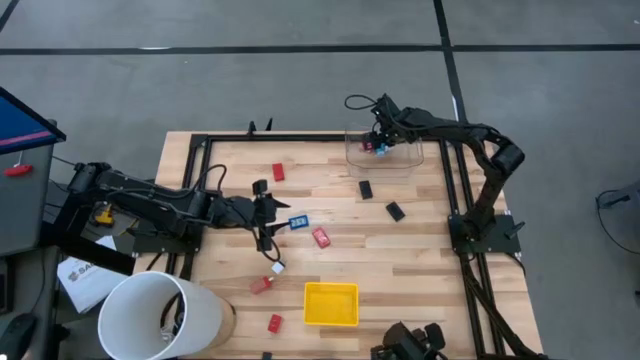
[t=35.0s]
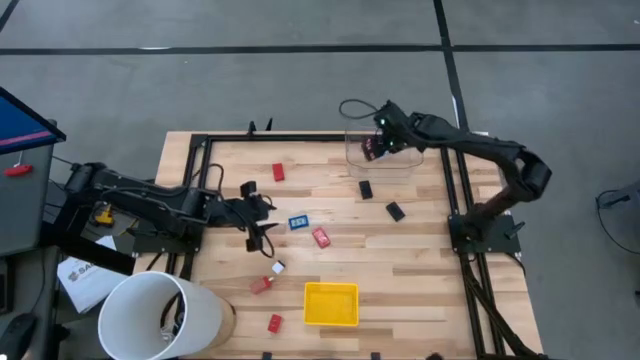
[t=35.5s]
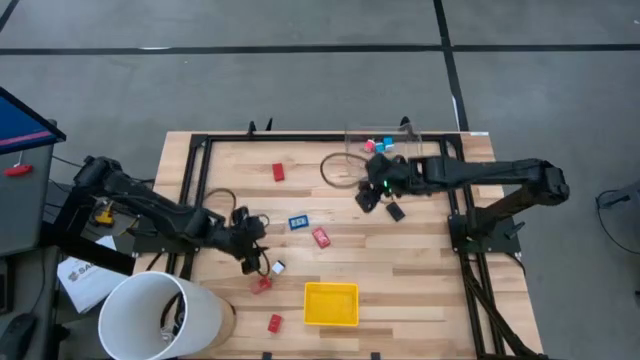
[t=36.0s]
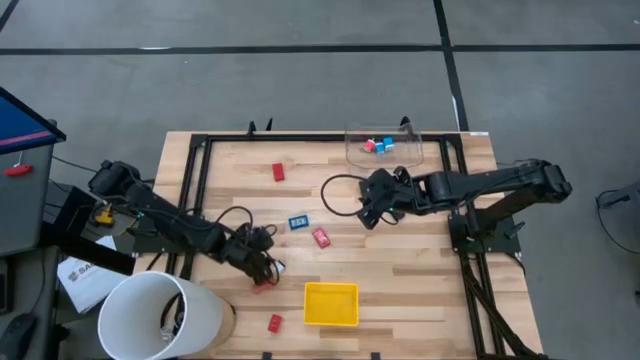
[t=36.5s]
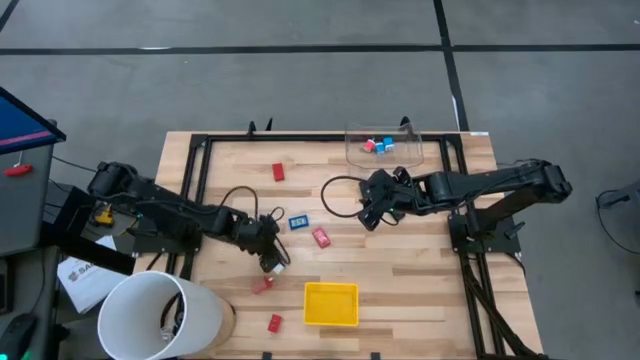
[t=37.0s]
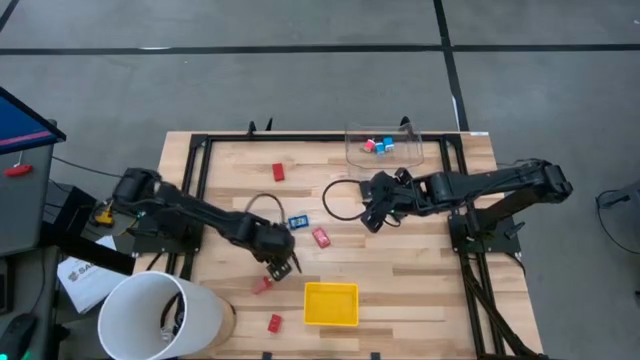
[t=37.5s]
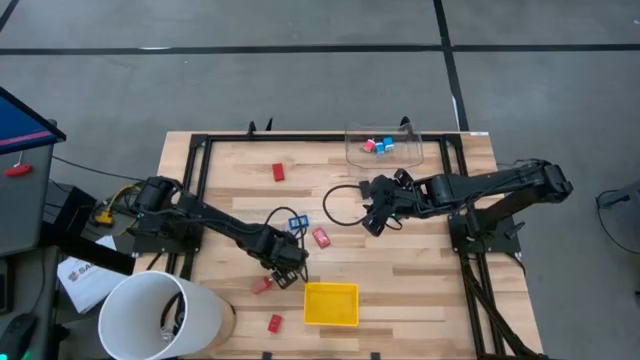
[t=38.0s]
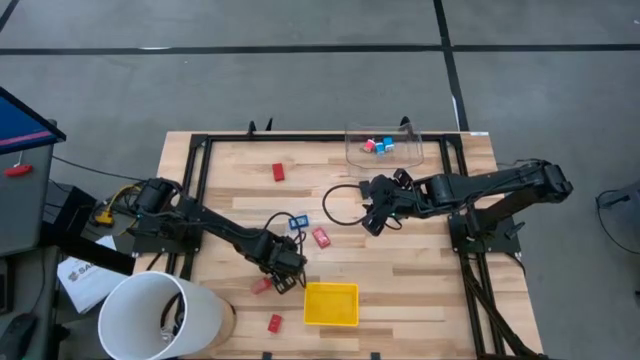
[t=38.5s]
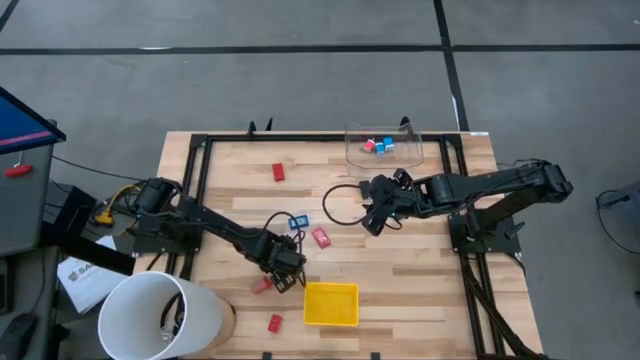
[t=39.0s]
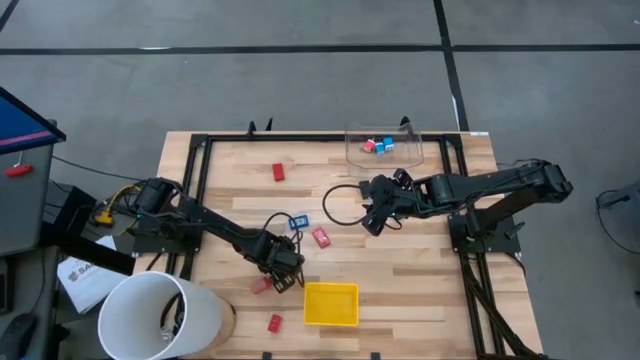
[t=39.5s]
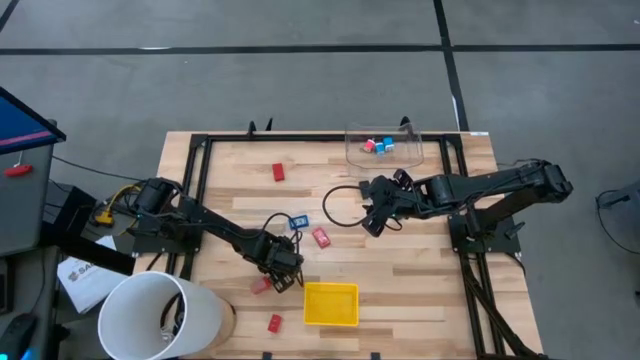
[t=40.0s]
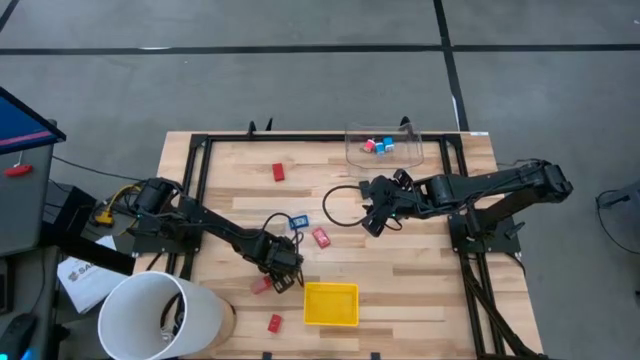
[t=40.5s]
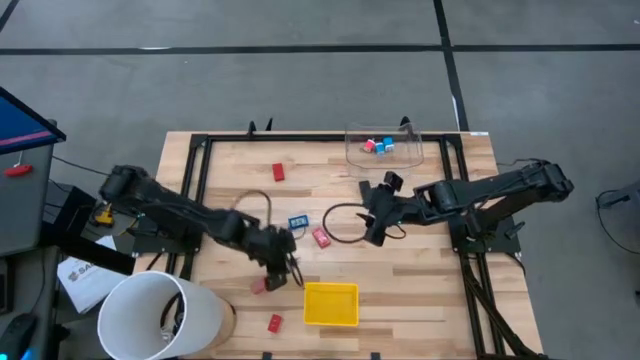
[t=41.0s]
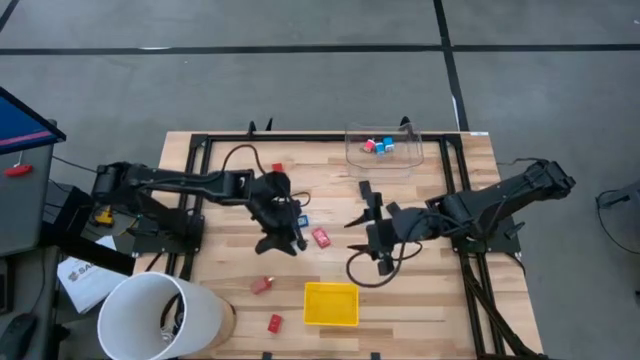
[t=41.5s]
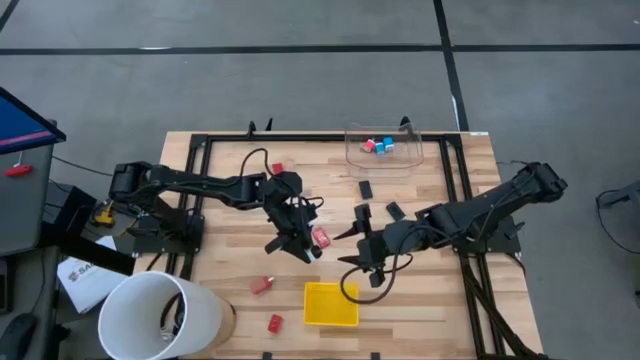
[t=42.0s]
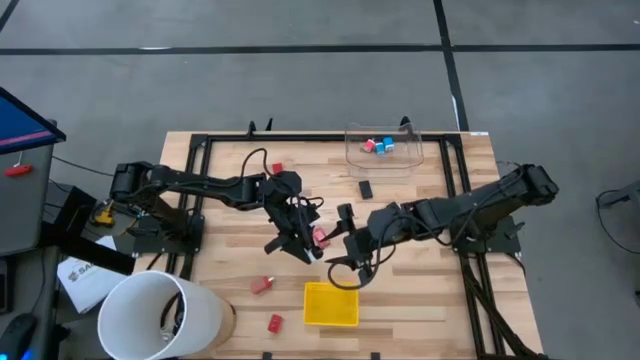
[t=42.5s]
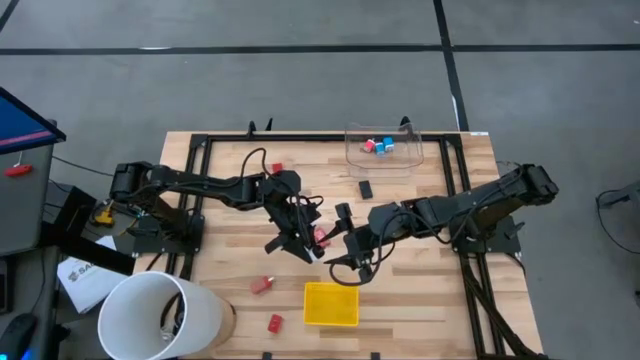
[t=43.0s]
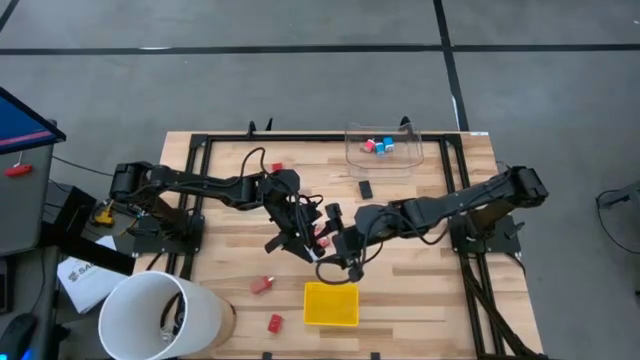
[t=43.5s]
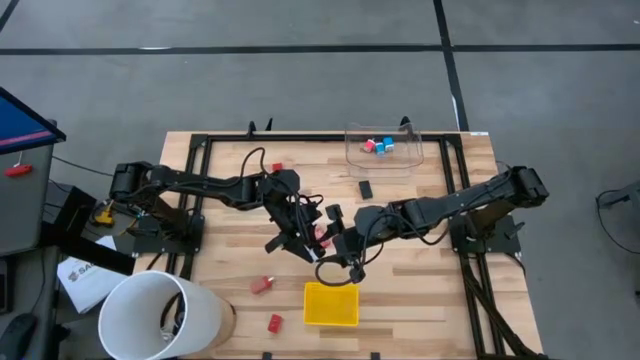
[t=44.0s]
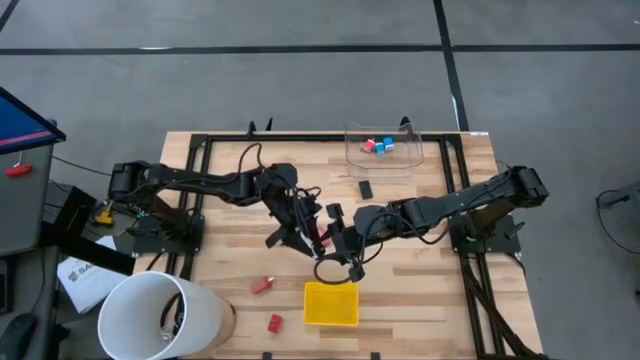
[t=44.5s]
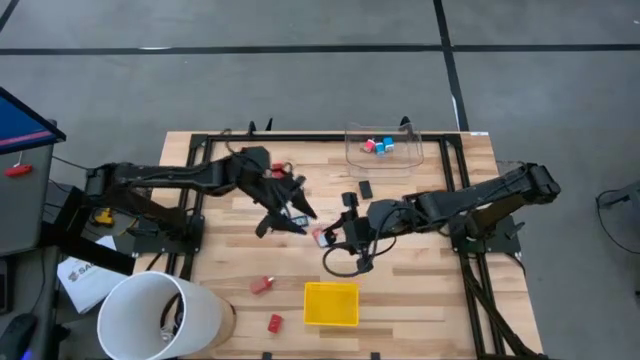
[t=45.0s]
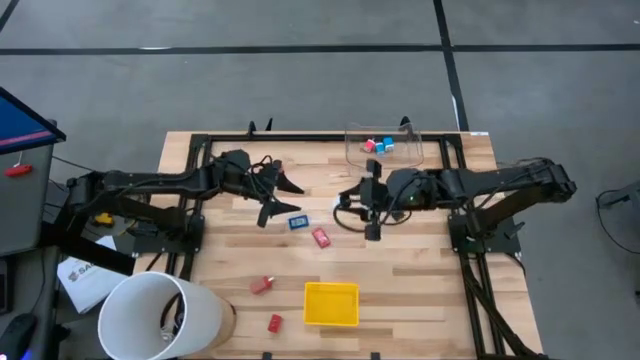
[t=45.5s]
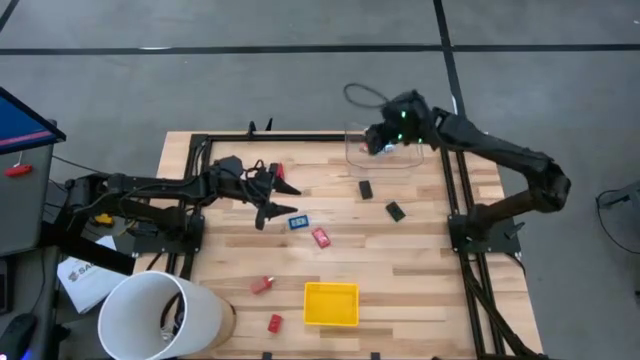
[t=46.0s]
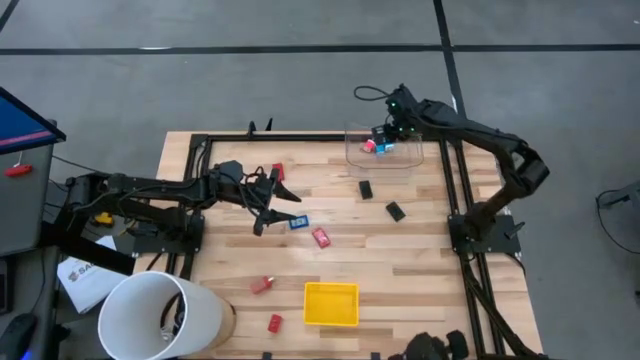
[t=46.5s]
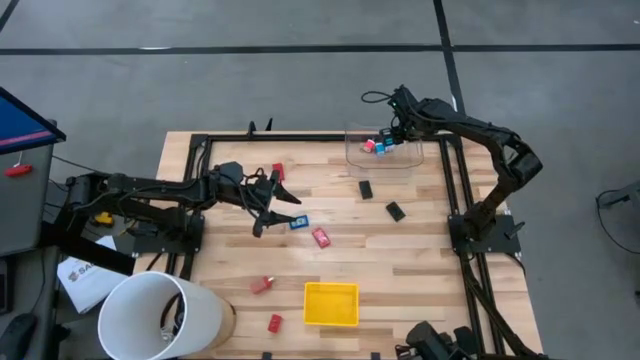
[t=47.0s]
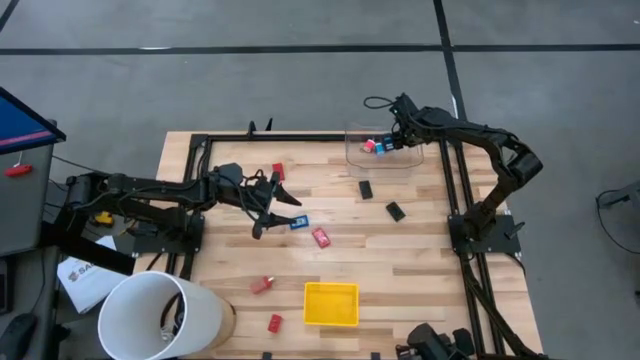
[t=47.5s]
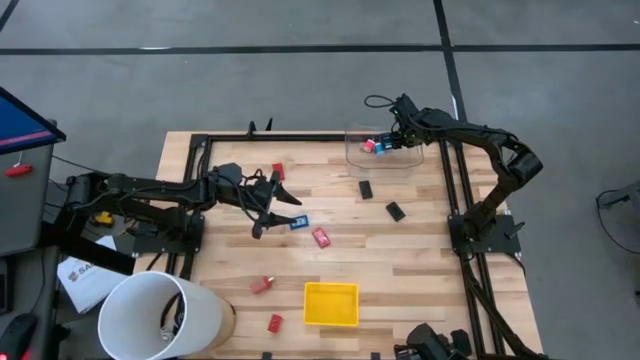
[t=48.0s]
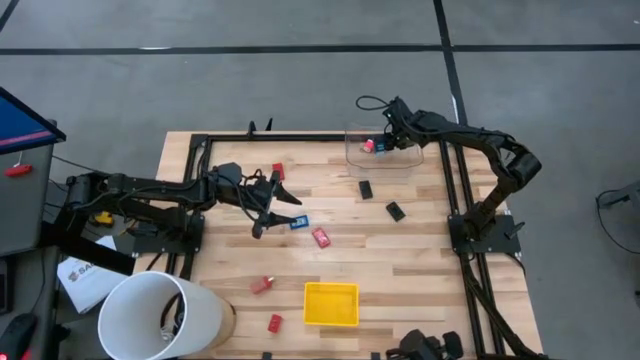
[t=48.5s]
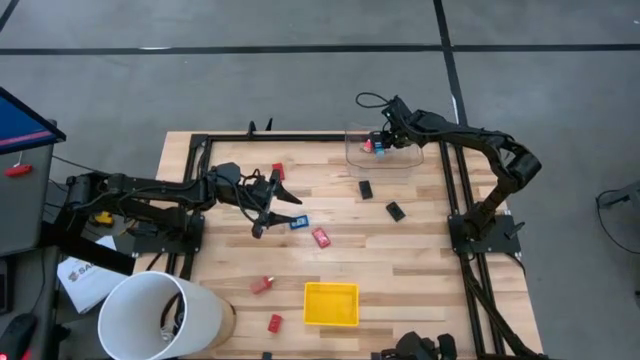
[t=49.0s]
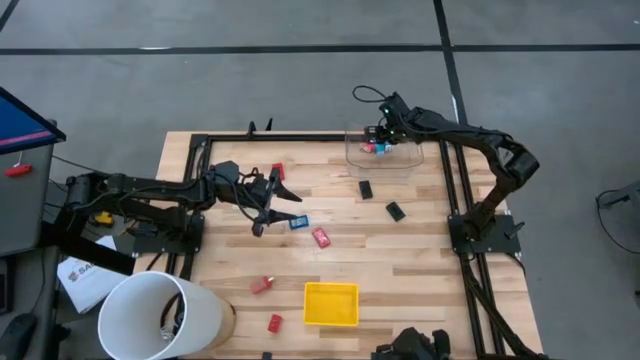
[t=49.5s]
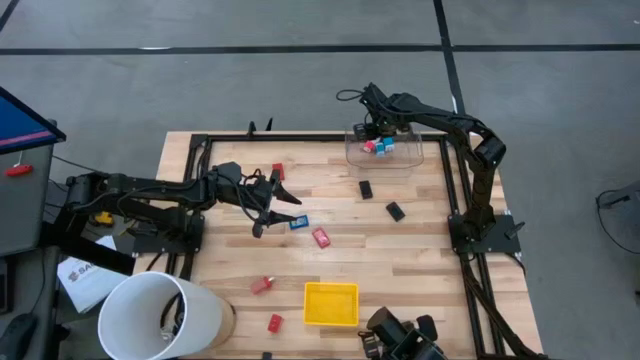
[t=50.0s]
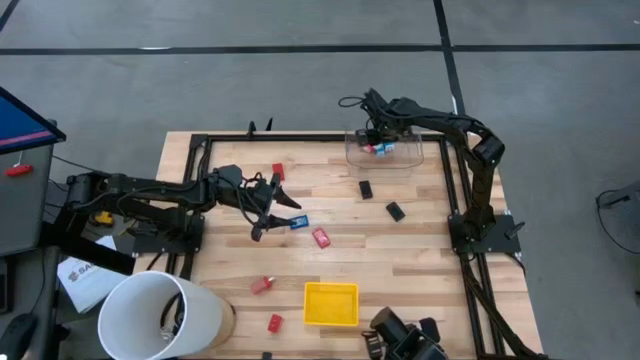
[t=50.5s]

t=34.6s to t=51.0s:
Task: Pick & Place Office items
Put the white charger adapter into the transparent bin

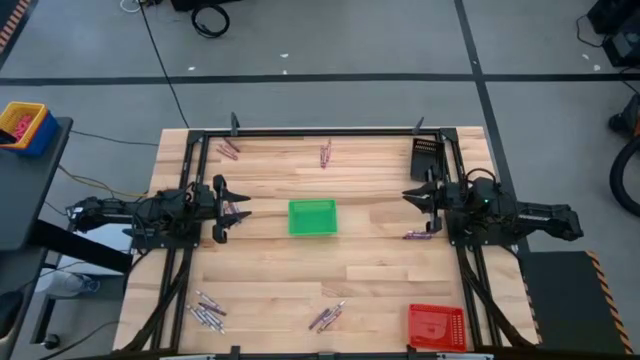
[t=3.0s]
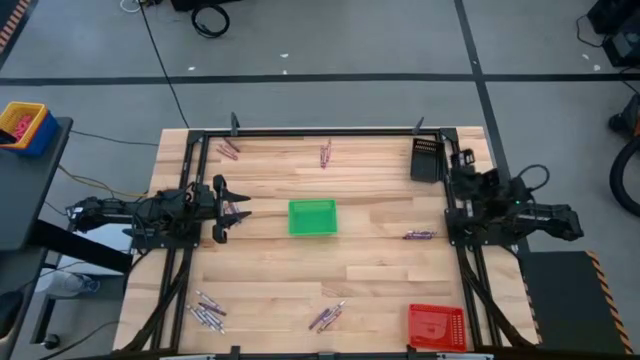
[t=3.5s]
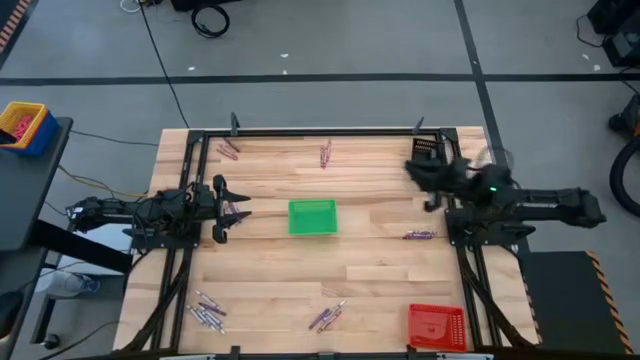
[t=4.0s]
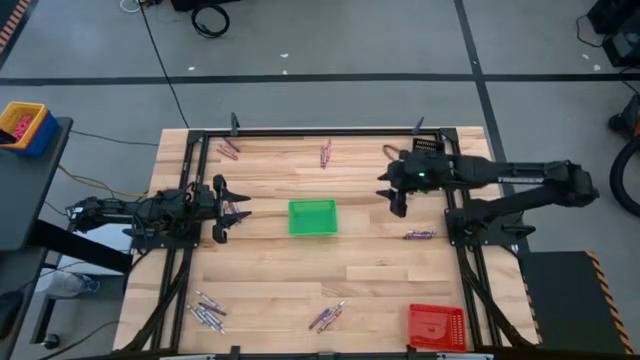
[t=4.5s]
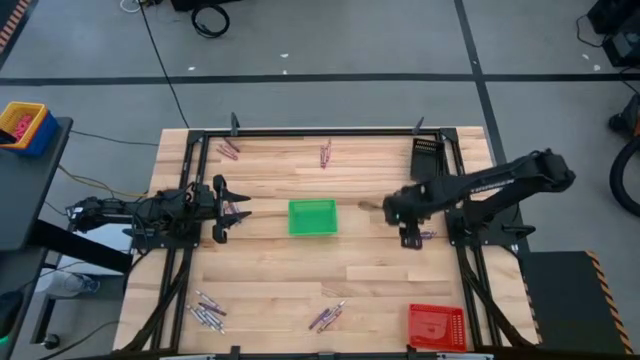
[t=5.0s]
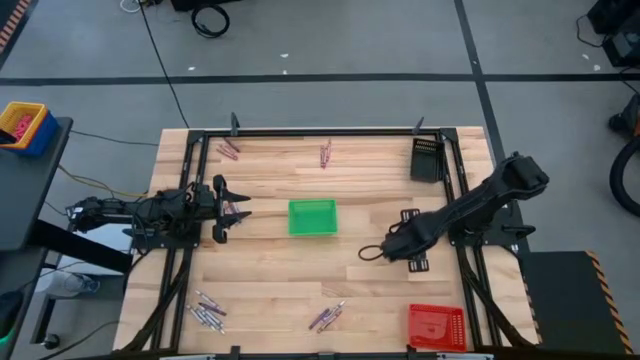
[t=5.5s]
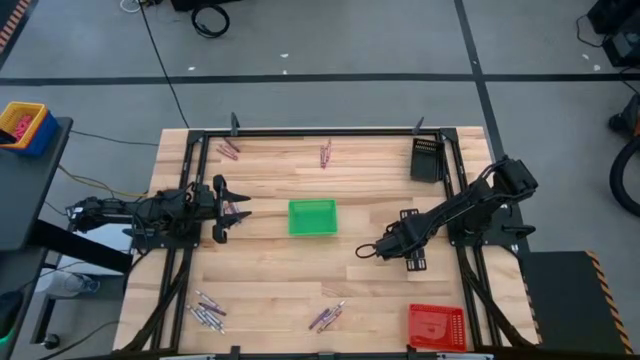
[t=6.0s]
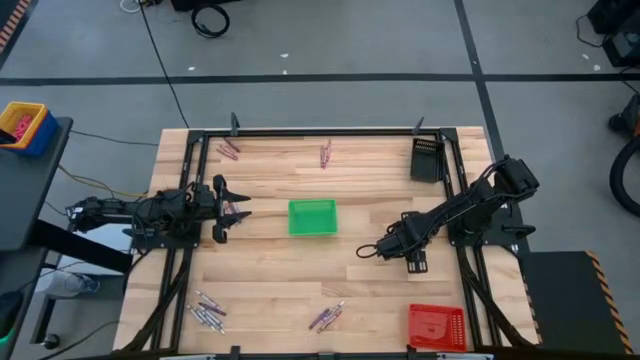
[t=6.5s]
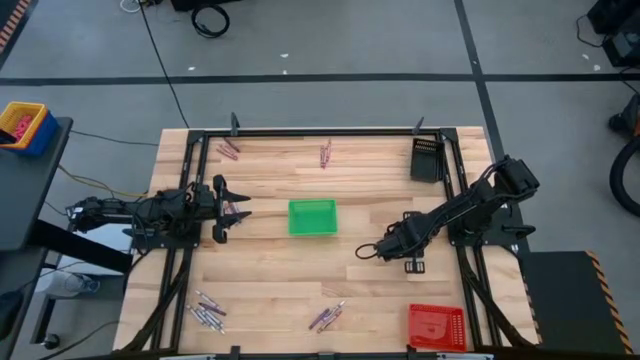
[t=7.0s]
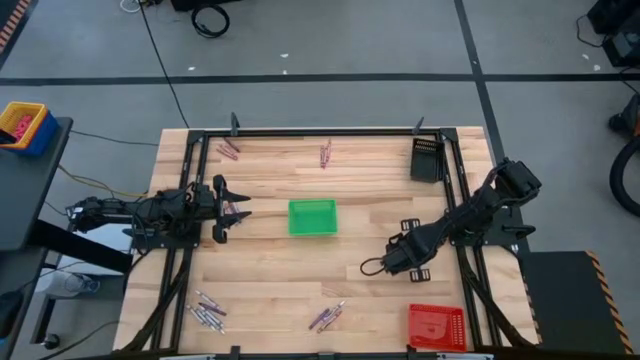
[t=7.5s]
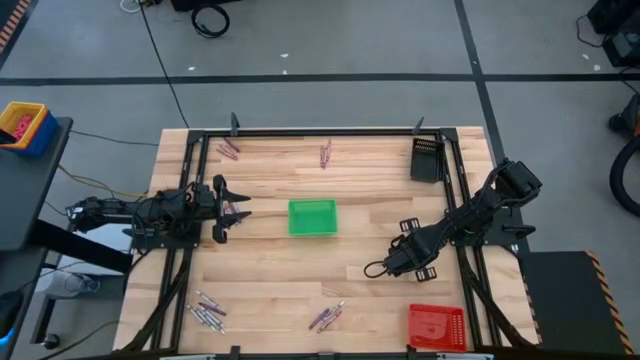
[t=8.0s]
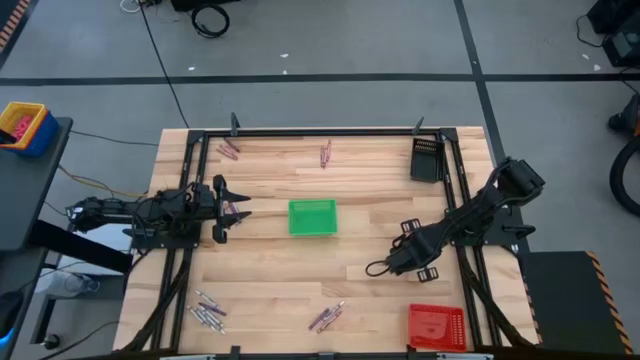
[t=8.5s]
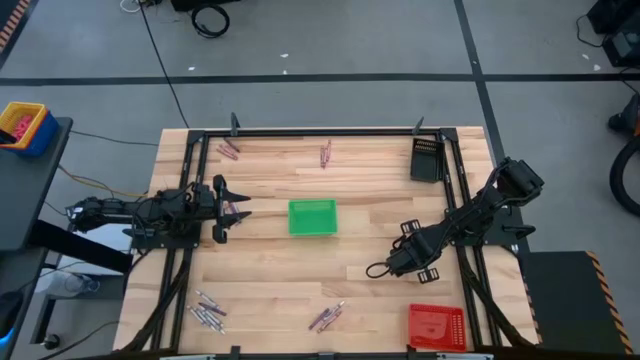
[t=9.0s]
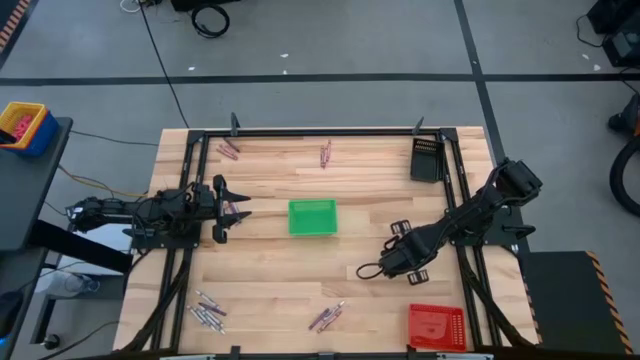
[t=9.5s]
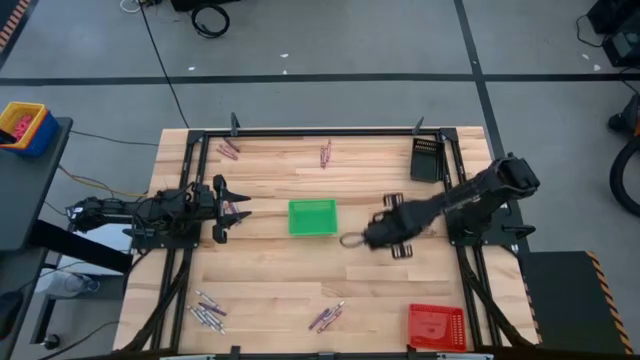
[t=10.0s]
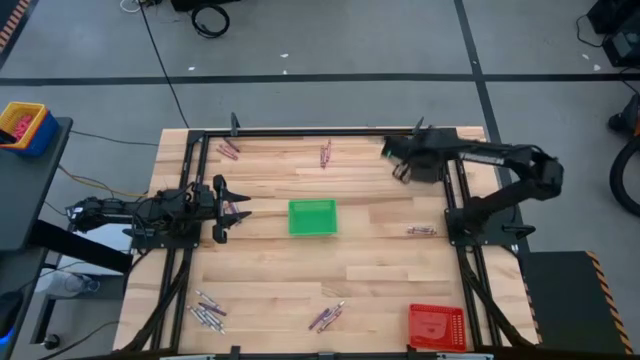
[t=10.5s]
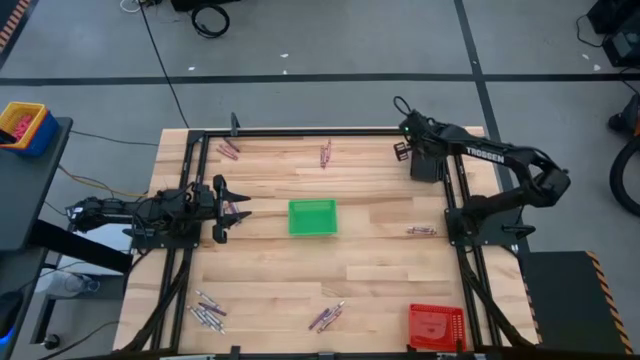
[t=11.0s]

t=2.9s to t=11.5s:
Task: Sort crayons
Put the violet crayon into the black basket
